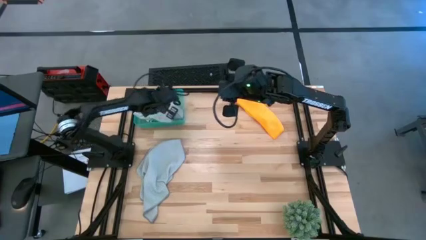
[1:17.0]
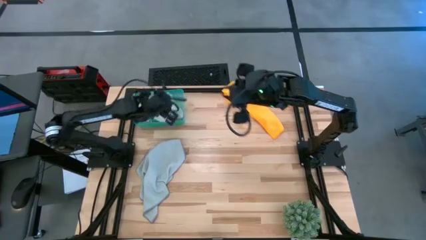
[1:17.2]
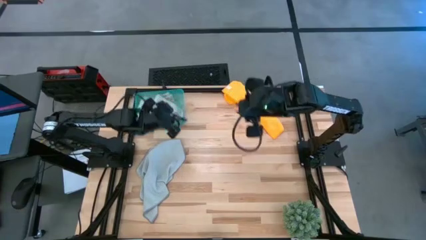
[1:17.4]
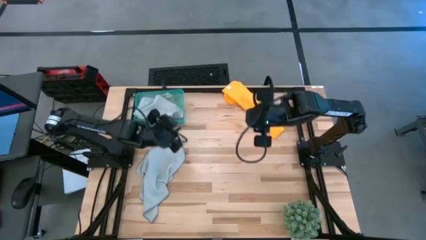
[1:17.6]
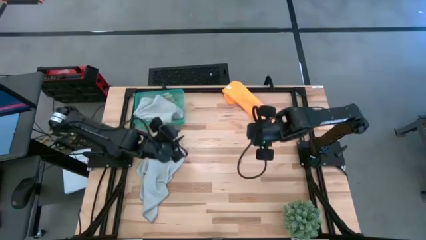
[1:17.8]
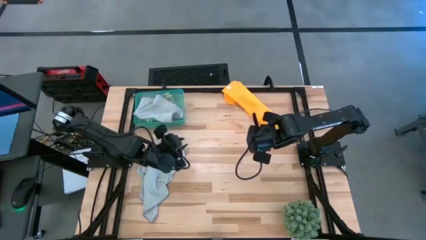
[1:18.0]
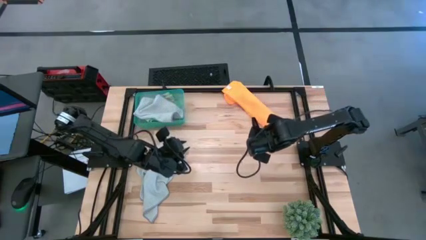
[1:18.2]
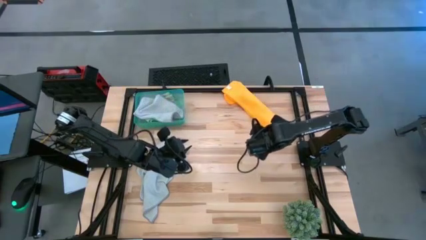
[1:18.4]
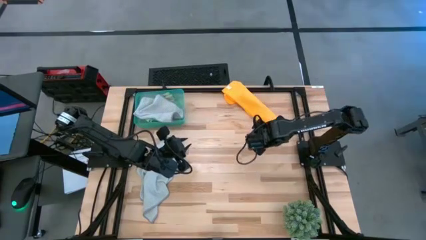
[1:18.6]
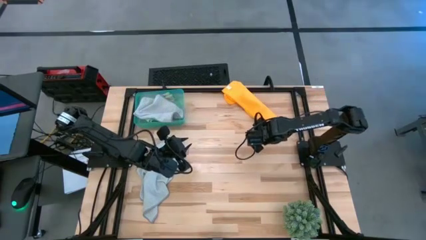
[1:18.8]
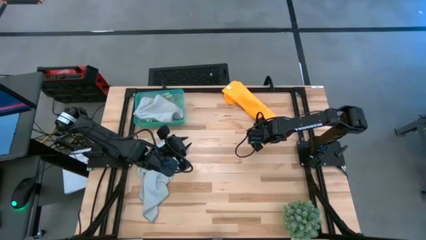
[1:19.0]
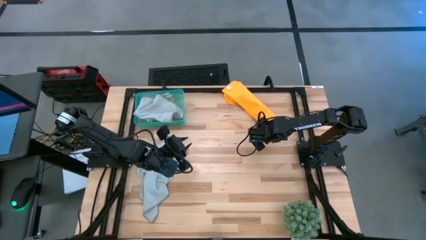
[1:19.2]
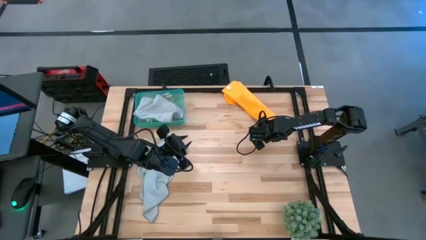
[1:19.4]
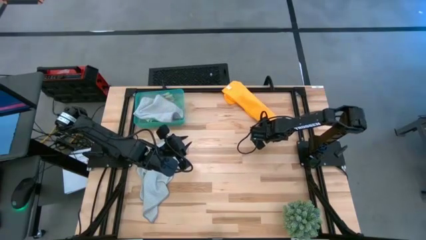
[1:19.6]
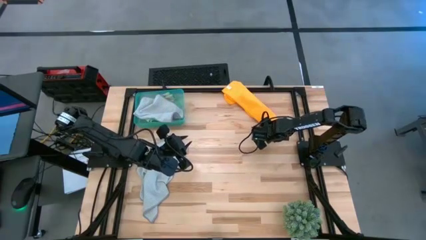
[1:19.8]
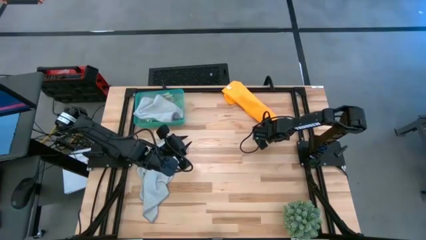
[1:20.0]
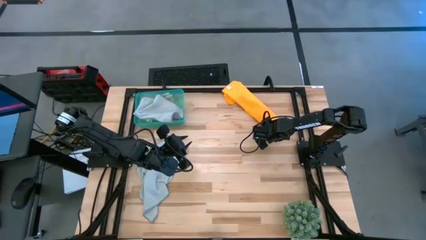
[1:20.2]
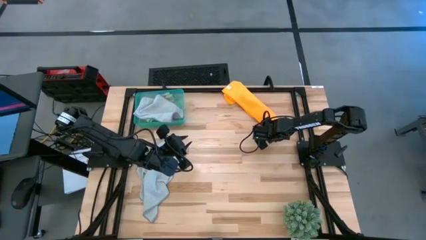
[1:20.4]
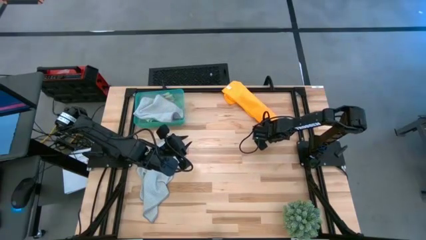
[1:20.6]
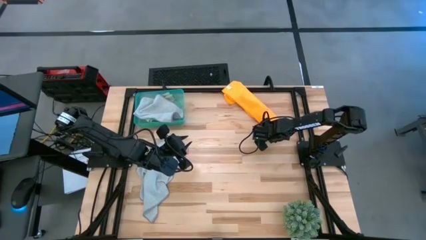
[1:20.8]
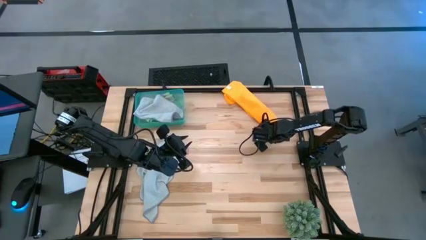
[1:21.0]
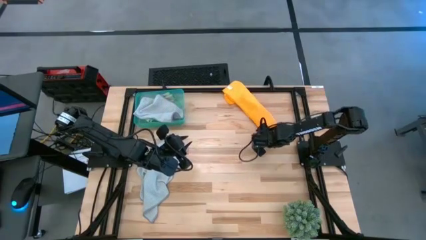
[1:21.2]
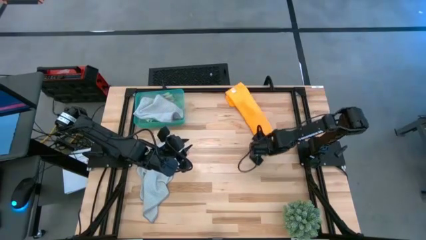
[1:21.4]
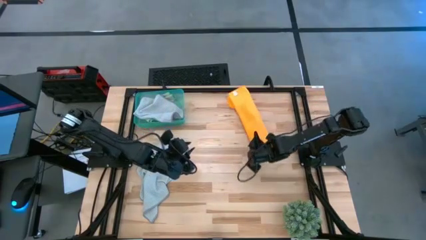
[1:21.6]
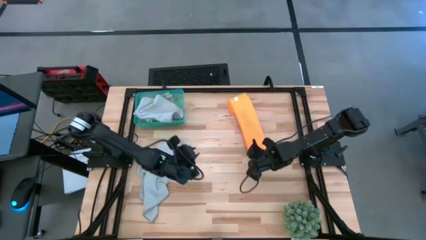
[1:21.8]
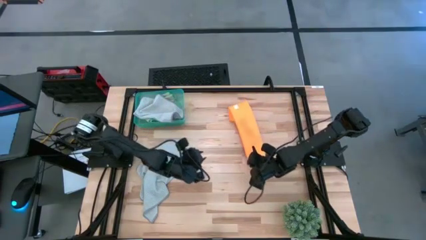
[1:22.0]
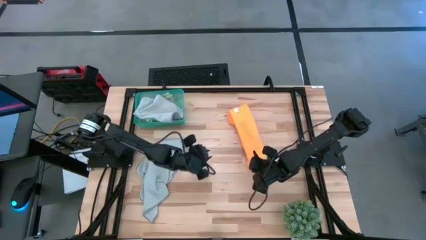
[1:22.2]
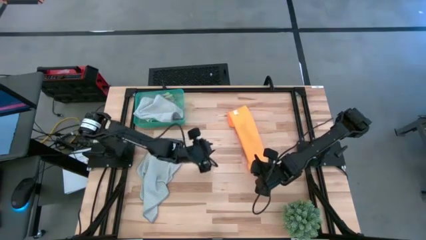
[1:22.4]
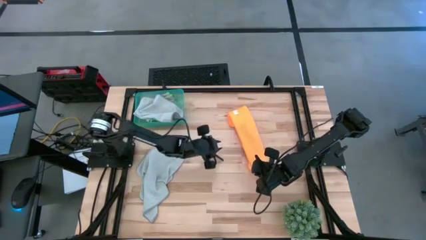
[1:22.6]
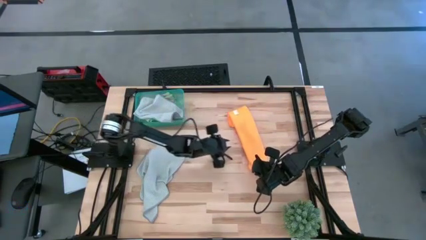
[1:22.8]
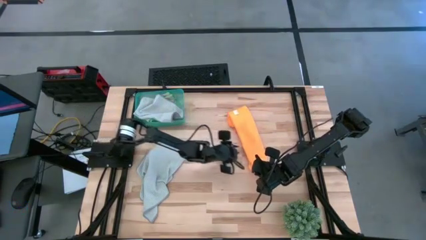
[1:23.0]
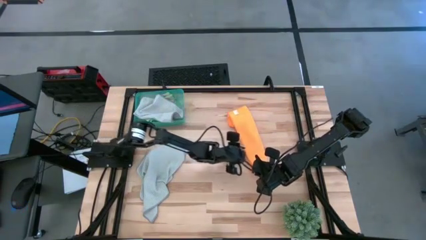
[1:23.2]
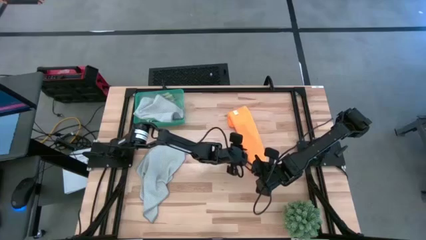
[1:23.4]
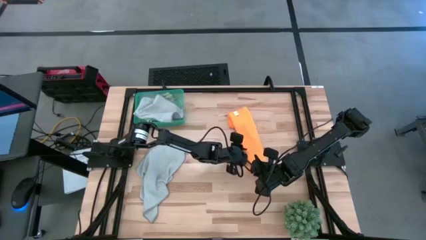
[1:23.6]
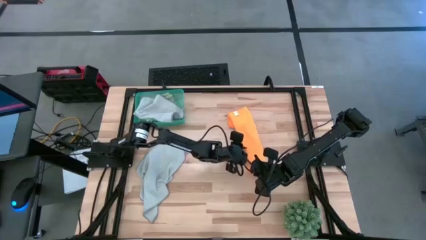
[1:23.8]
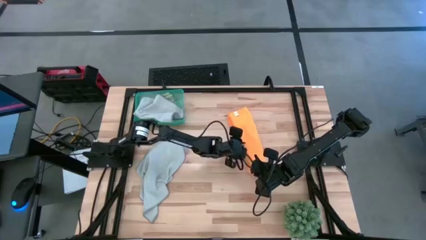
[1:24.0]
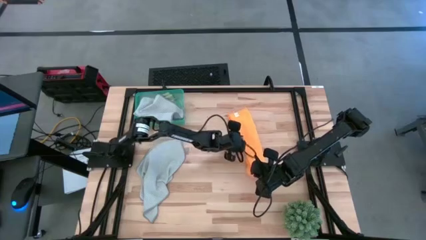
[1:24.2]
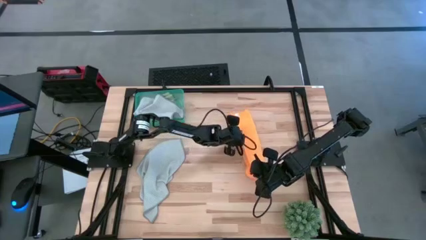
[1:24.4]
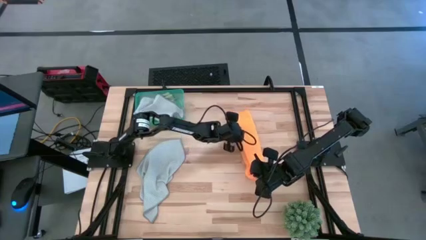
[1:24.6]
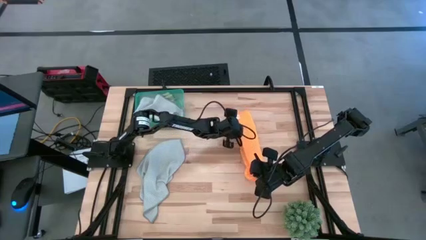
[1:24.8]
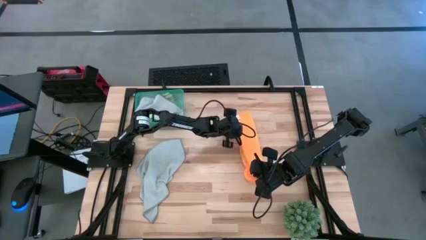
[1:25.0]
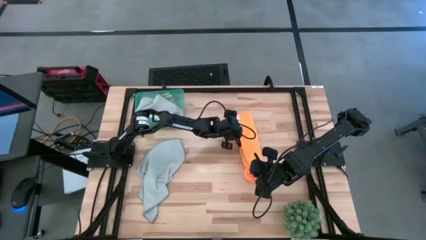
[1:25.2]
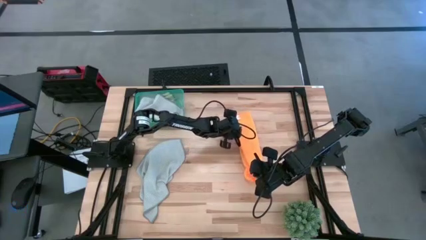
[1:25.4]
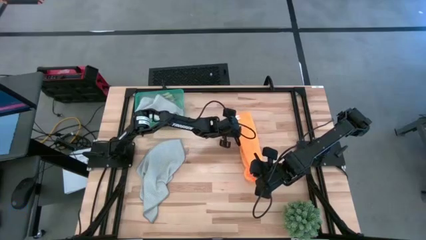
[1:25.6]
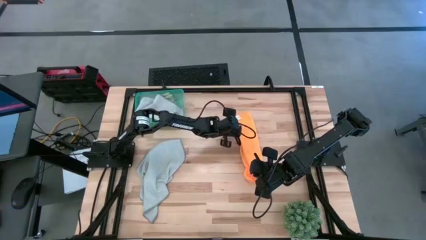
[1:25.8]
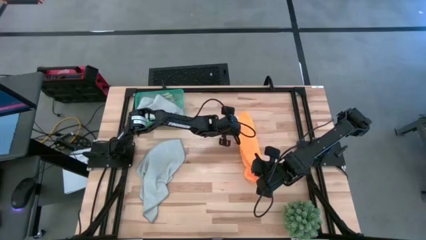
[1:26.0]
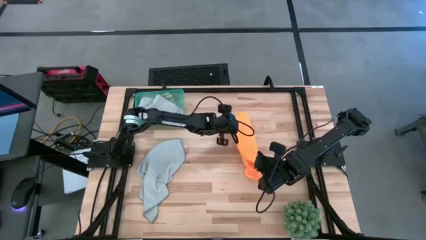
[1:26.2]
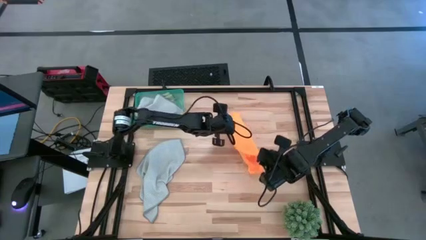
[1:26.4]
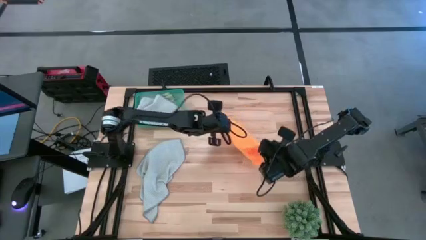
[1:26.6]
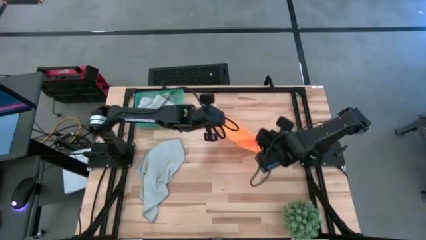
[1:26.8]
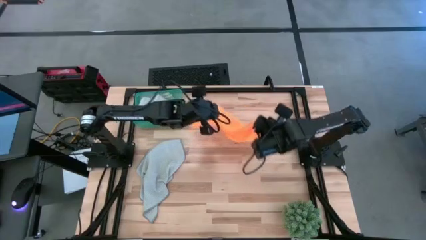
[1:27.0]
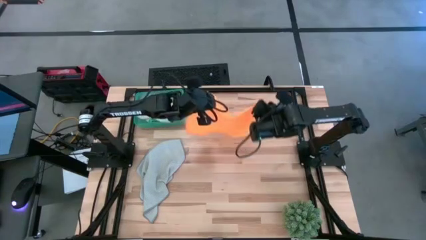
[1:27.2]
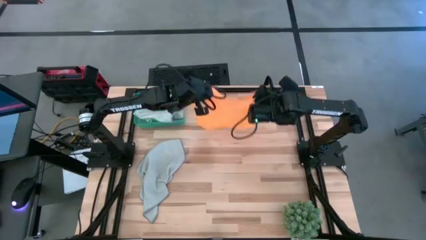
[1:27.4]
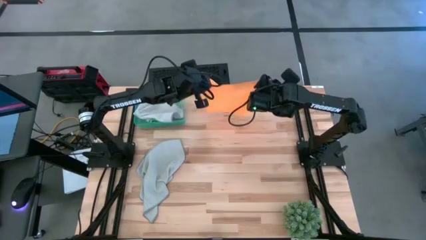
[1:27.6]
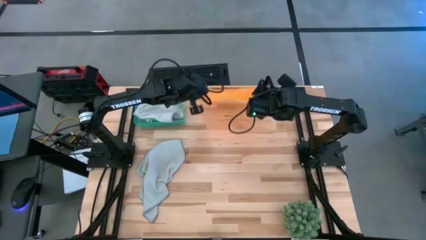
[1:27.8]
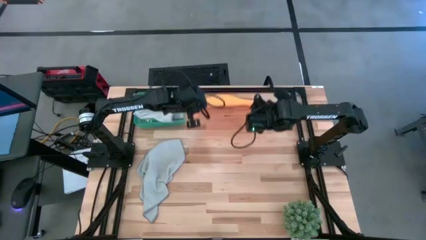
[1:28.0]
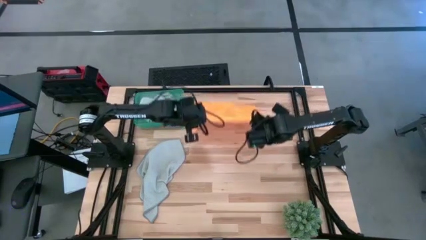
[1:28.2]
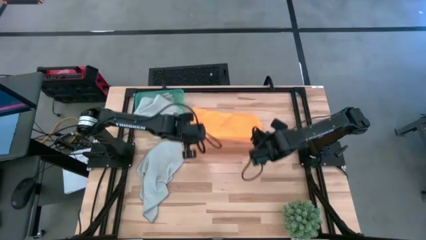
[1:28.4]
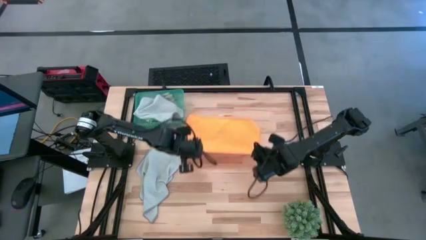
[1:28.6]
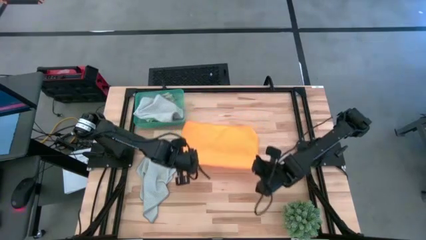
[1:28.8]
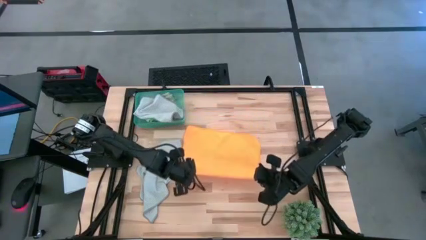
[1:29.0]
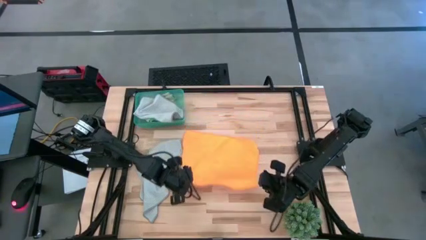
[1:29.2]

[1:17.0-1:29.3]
Task: Fold microfiber towels
Fold the orange towel

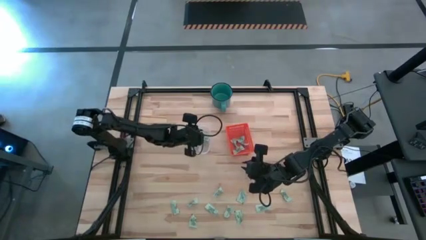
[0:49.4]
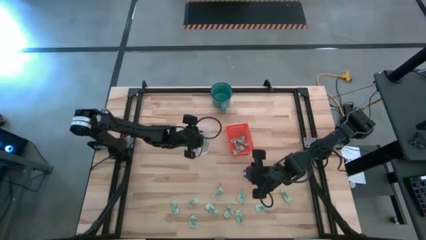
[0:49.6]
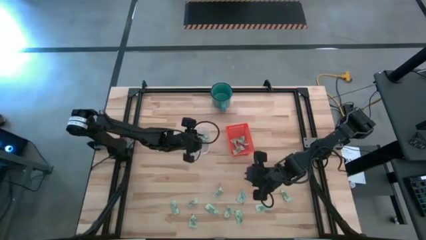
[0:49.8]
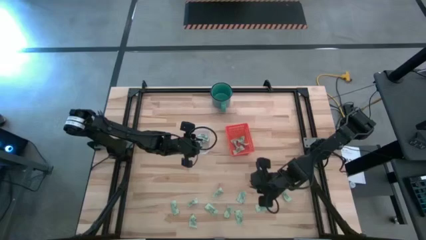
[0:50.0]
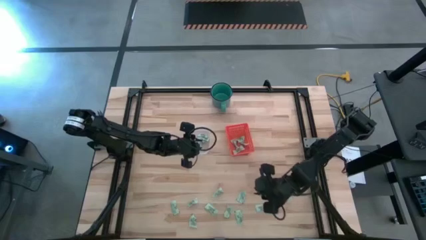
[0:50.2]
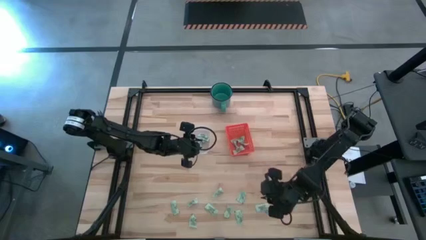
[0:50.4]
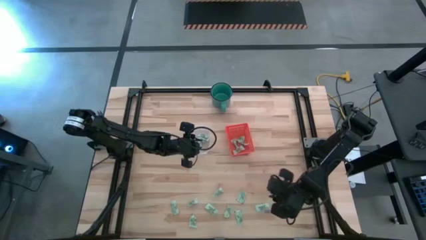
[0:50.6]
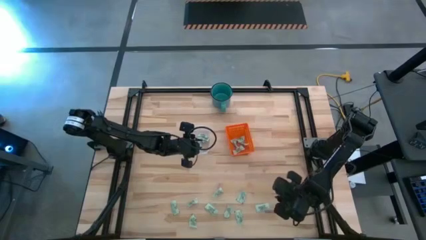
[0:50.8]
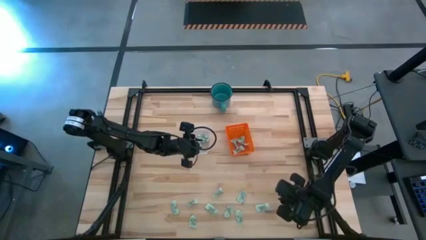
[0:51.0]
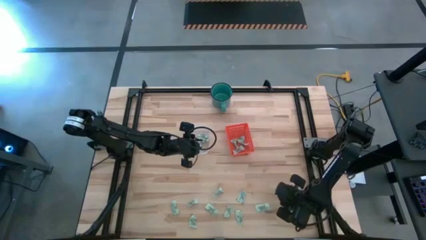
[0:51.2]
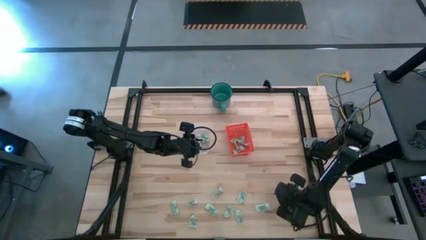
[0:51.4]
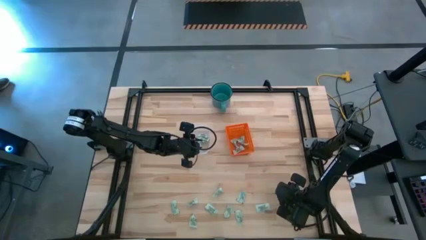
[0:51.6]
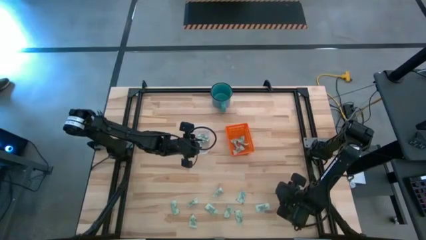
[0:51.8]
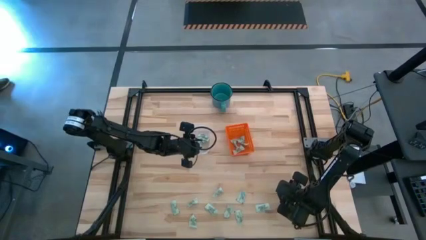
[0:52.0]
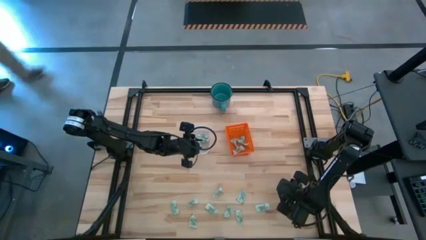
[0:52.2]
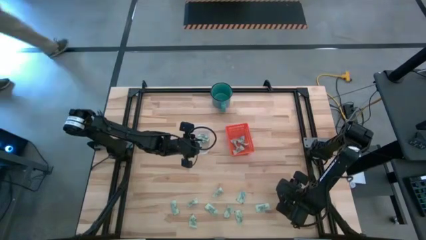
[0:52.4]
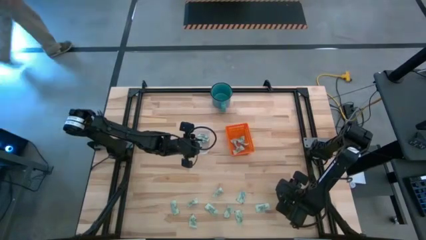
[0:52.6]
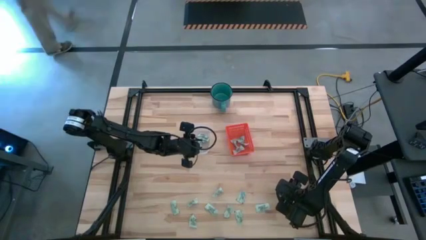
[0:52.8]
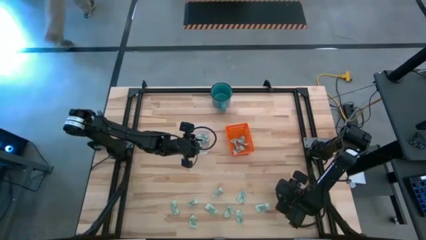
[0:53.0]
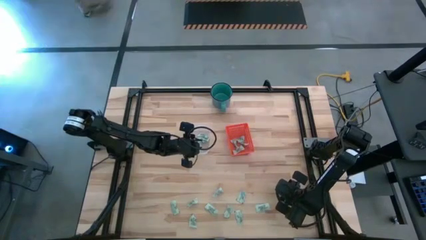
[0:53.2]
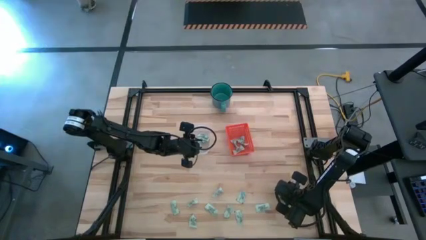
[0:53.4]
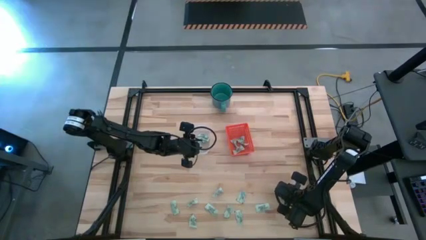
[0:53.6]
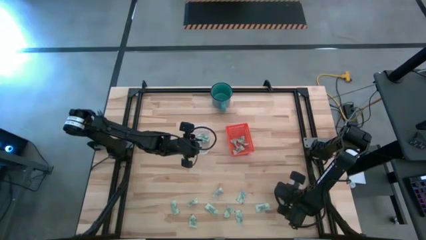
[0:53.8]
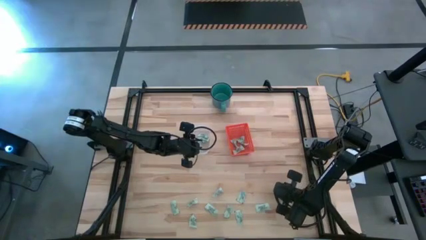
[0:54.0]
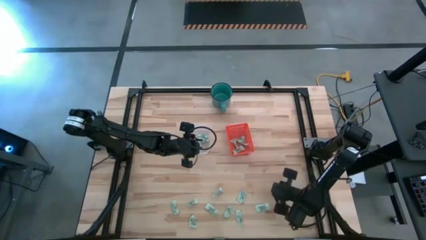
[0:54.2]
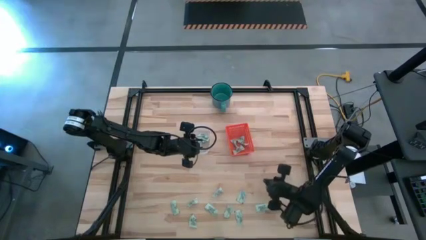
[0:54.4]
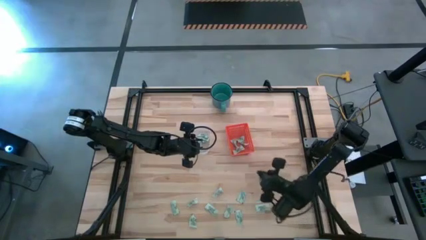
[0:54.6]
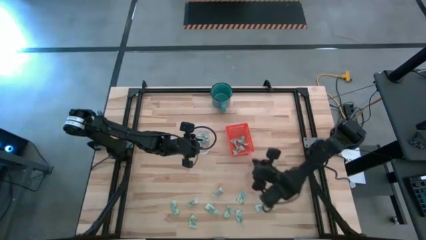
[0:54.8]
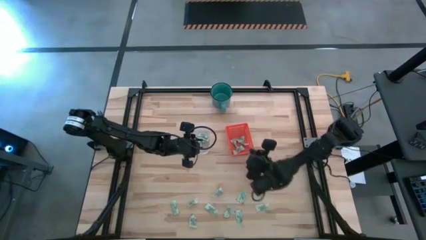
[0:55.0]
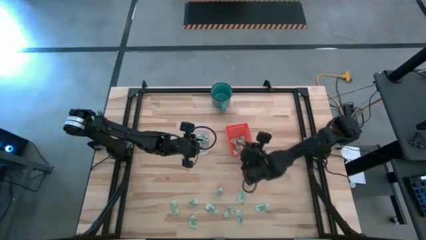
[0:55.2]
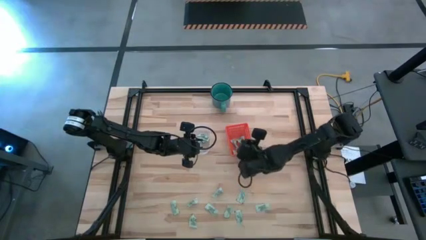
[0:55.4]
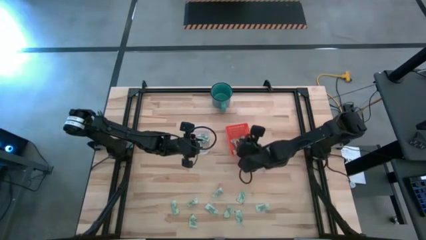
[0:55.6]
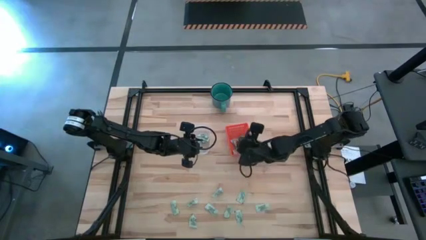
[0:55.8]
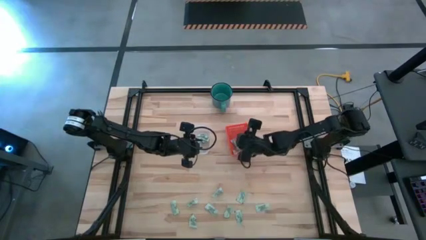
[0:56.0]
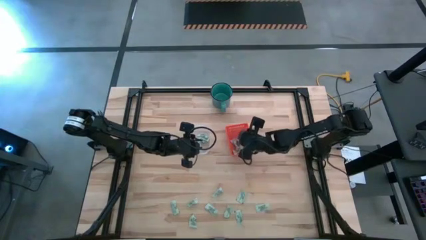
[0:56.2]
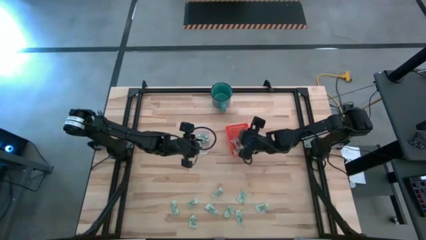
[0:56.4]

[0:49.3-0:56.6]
Task: Pick and place items into bin
Put the stevia packet into the orange bin
